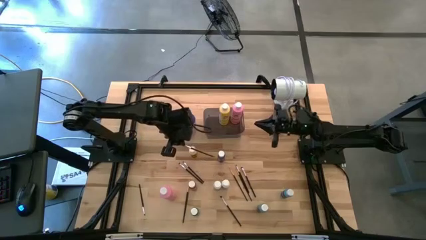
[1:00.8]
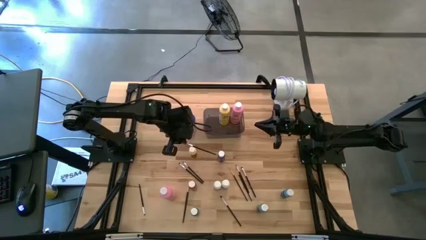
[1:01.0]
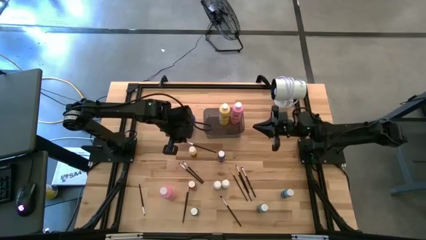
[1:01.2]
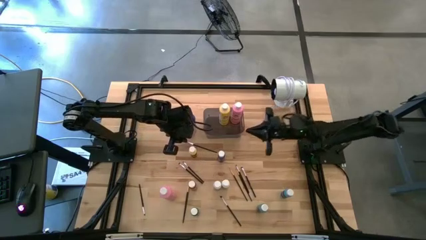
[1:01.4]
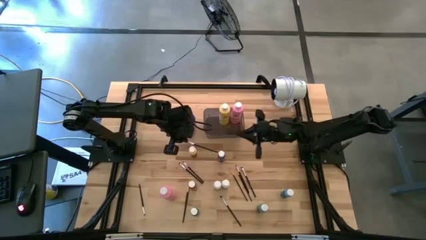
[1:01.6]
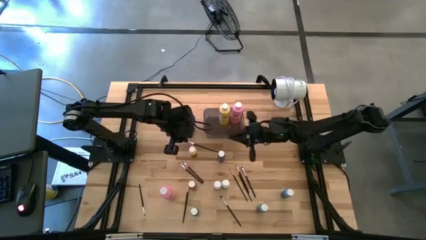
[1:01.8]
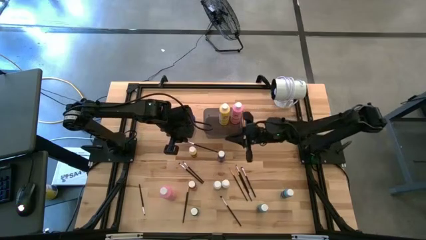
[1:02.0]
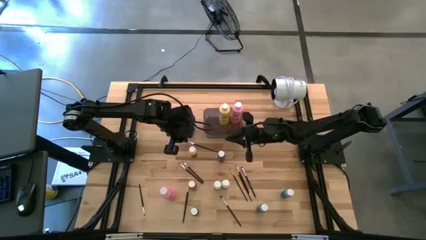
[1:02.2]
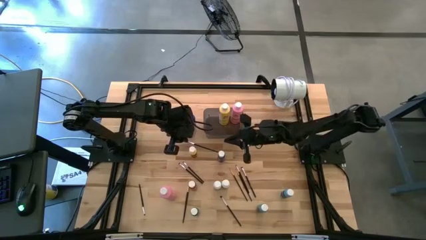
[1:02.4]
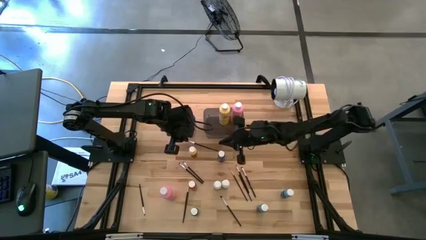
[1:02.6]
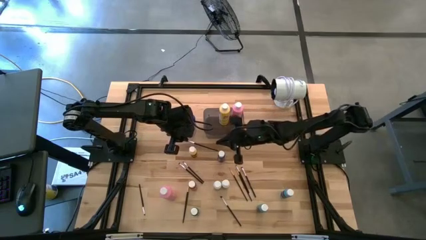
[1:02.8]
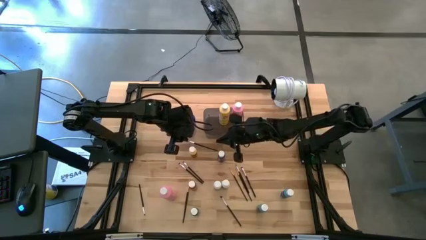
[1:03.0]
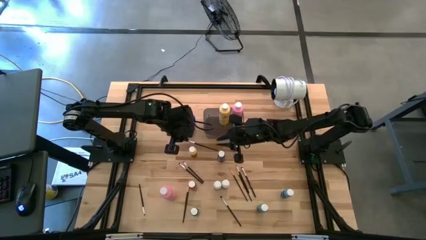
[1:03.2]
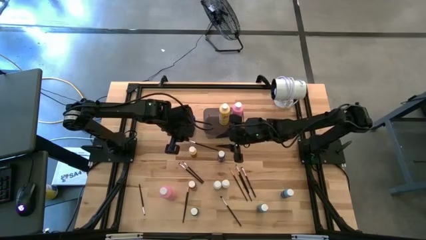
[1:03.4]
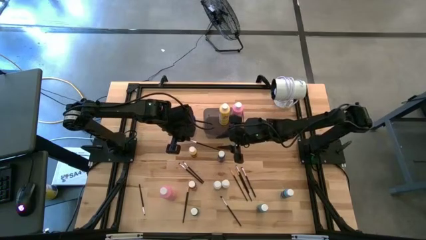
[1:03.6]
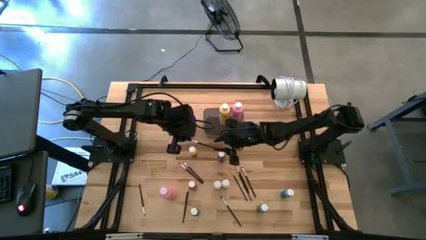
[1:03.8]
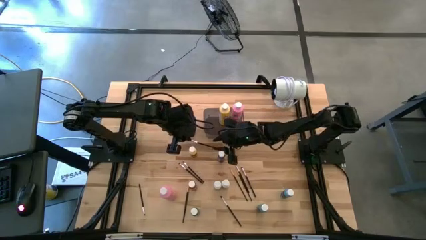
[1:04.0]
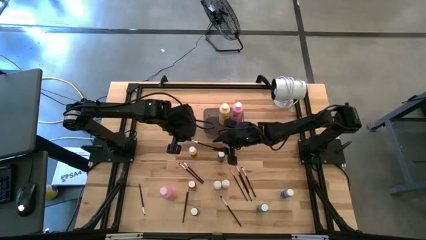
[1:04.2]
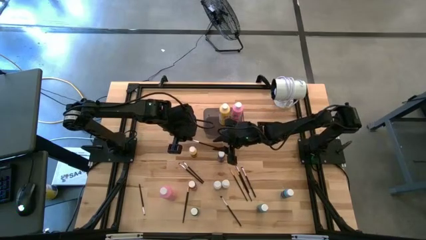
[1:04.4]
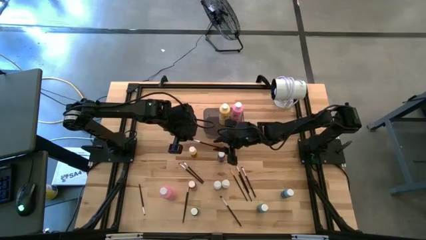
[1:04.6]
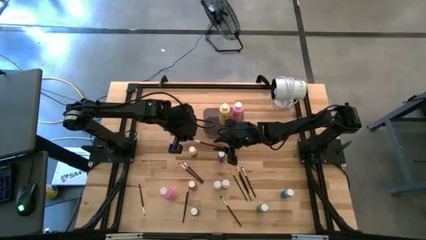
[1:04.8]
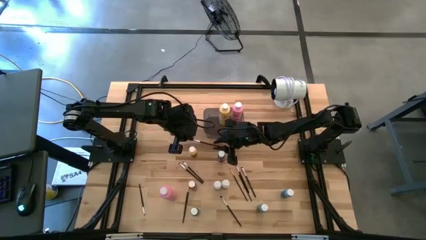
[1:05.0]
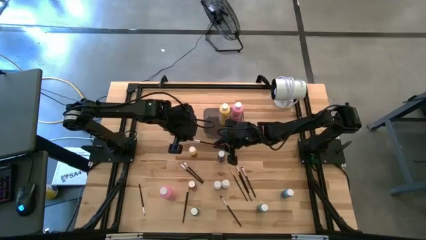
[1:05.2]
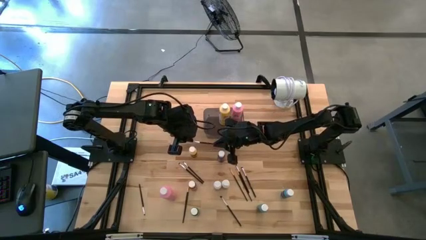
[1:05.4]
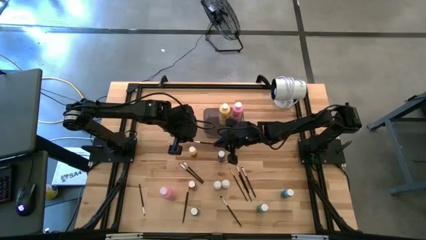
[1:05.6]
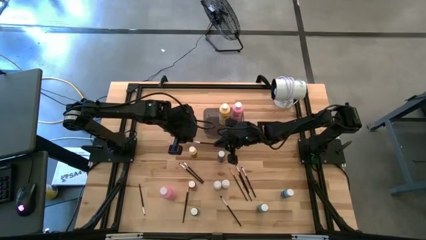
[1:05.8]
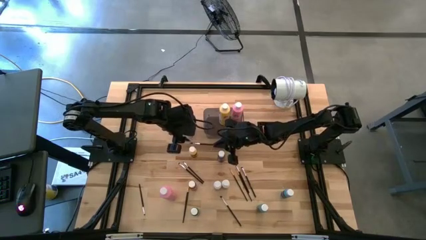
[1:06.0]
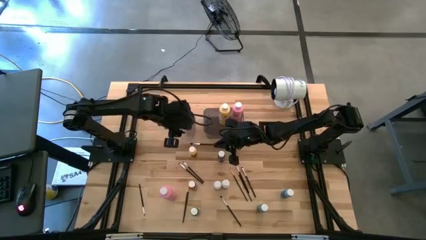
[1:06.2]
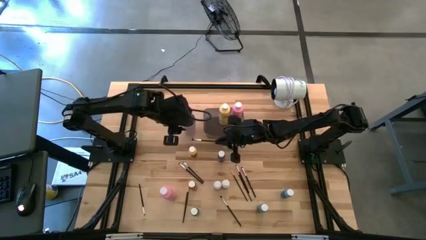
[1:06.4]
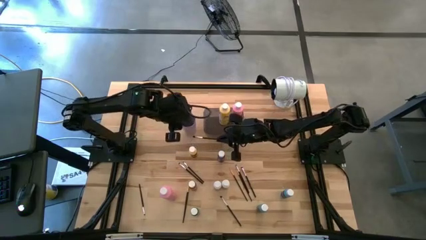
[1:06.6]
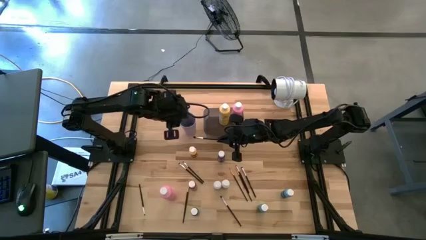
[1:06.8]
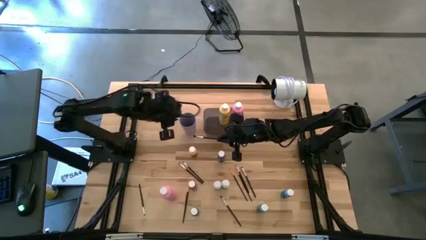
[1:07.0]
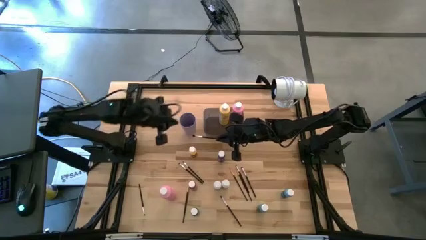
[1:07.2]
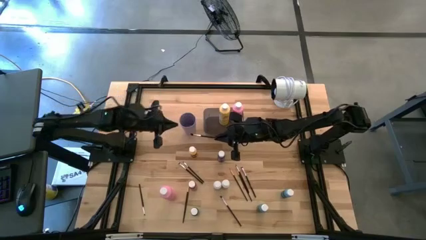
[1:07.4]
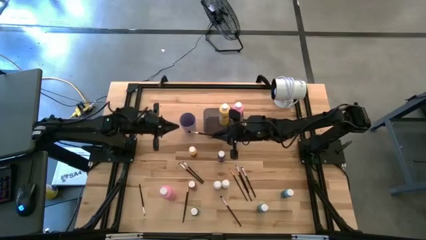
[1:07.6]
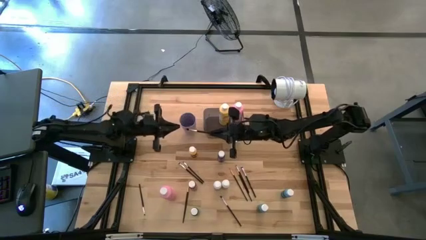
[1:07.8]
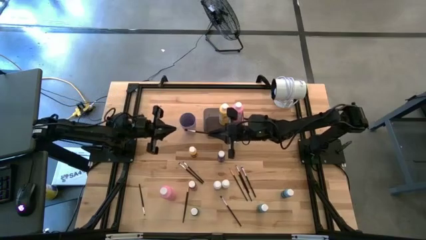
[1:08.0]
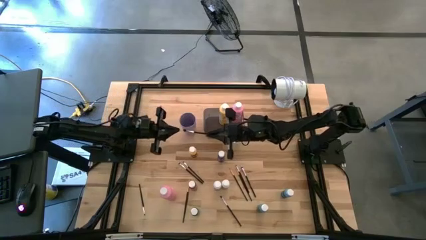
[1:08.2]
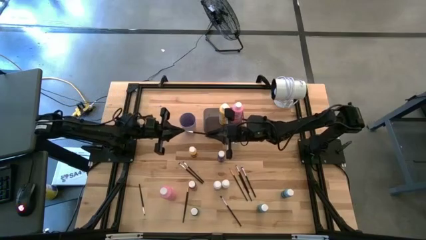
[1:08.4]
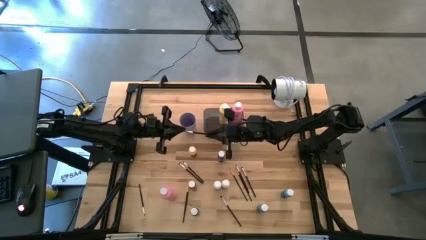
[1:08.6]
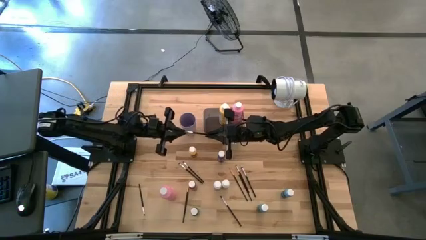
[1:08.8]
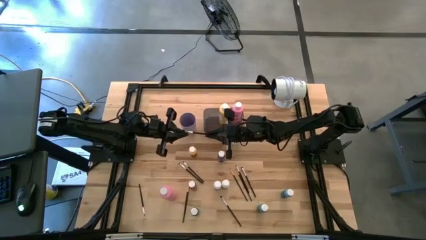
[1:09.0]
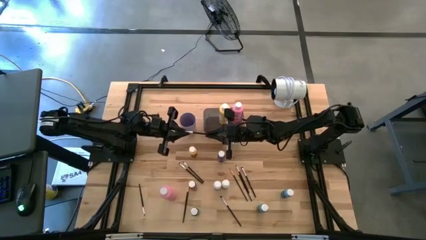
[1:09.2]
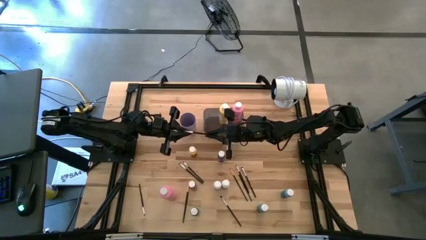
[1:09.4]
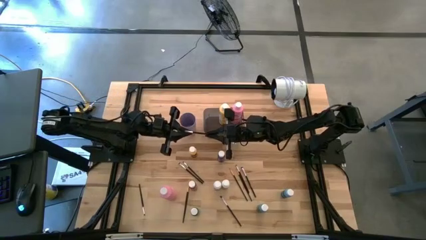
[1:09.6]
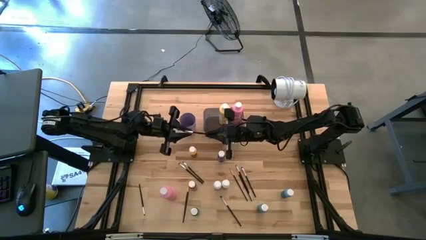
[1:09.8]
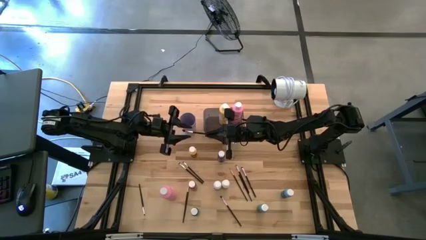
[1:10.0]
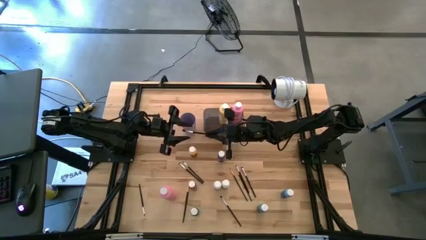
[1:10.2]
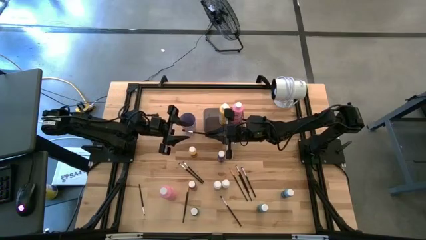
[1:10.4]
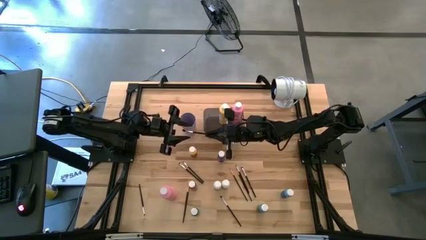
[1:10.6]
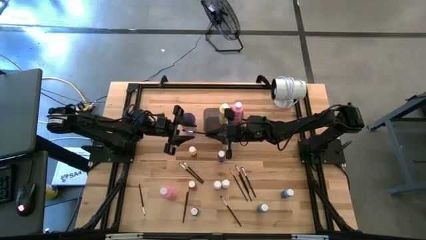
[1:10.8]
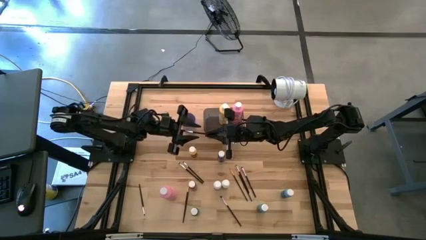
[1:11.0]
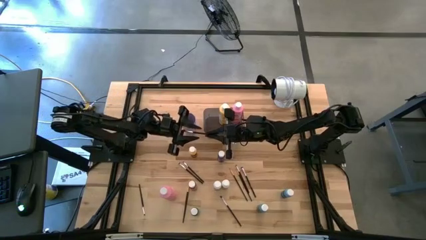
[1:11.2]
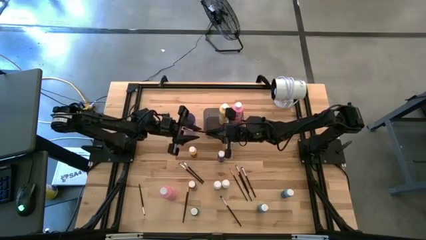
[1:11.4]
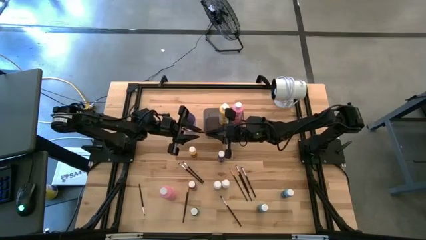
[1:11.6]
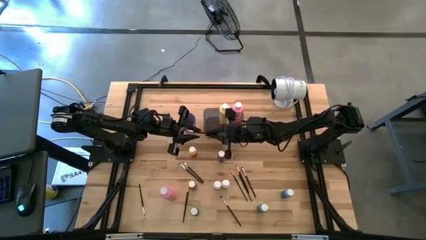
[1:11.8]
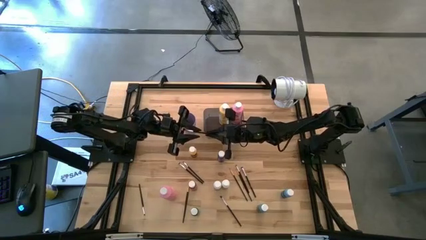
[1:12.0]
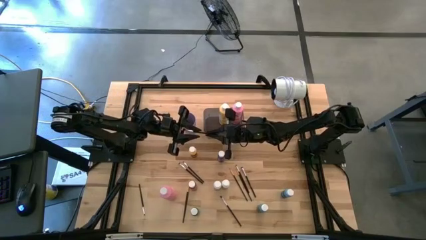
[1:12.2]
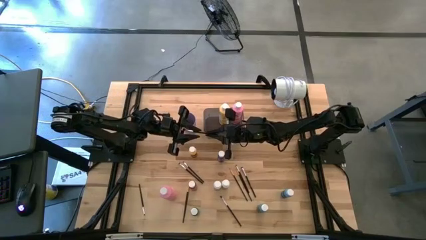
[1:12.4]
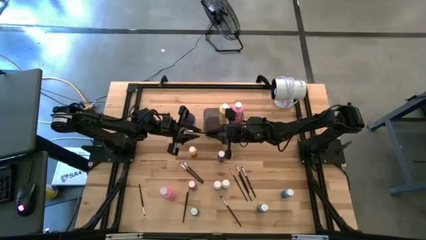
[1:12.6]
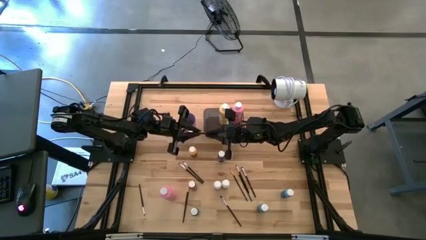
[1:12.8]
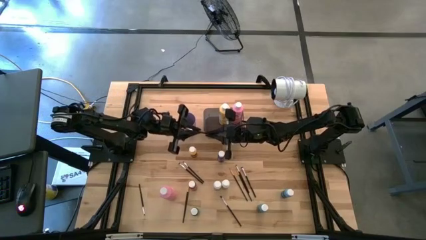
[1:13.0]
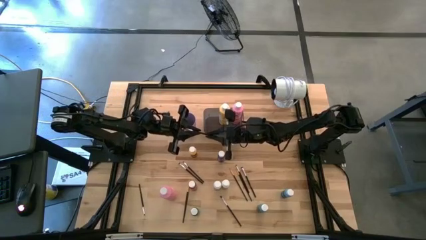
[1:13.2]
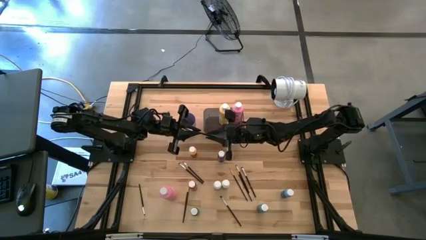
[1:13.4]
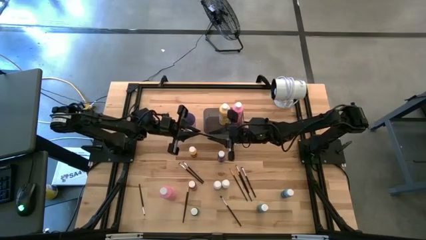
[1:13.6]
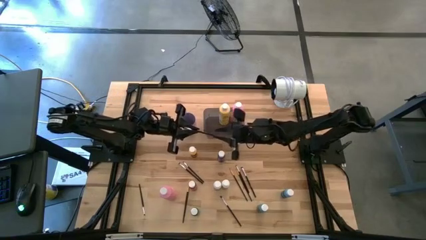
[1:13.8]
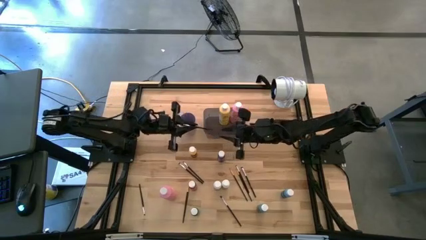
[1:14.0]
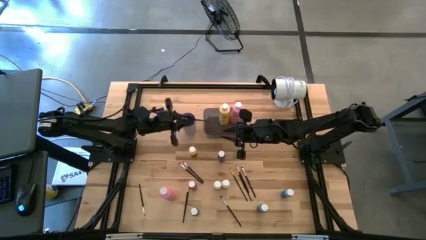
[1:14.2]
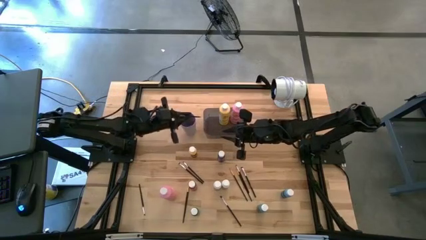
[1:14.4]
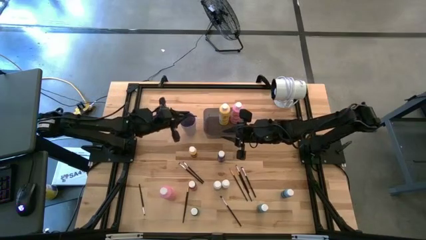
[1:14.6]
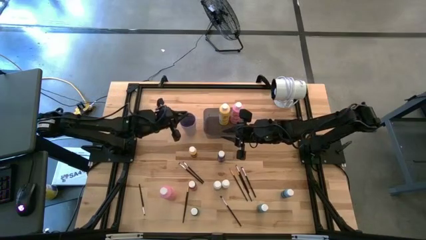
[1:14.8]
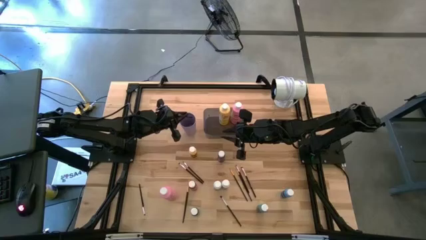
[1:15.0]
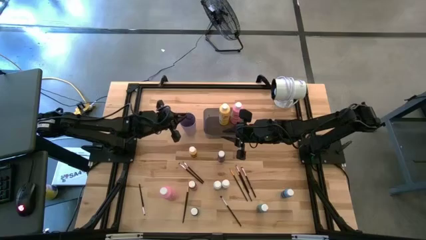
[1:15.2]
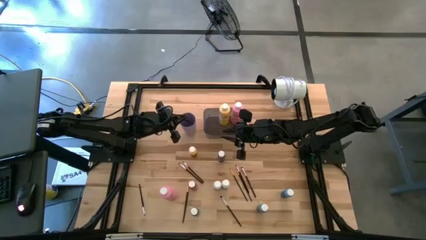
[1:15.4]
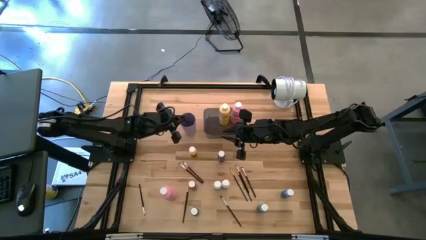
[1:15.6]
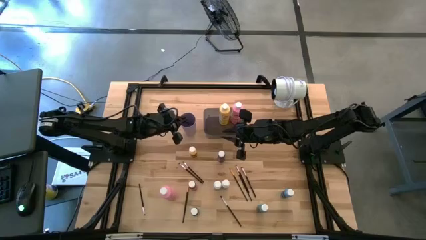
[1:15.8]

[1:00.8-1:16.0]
Task: Pick & Place Paint Supplies
Put the silver paint brush into the purple cup
